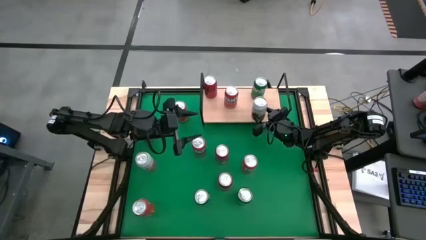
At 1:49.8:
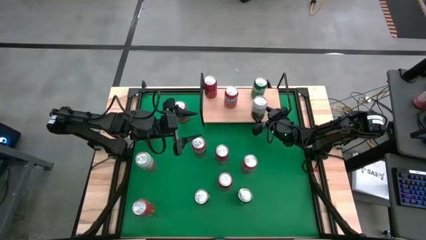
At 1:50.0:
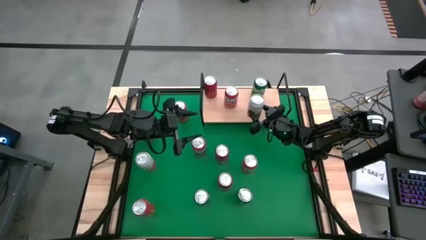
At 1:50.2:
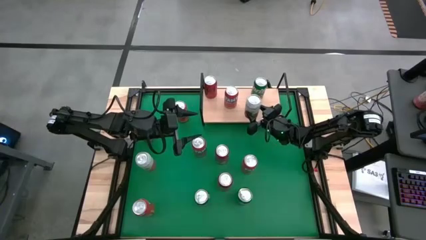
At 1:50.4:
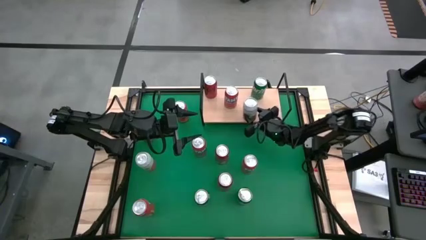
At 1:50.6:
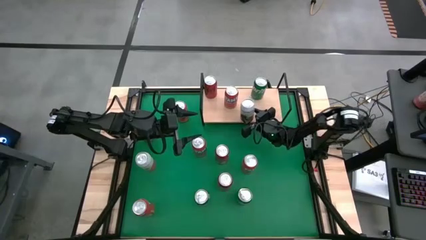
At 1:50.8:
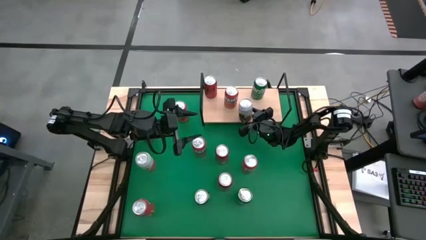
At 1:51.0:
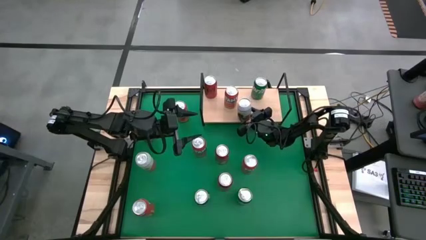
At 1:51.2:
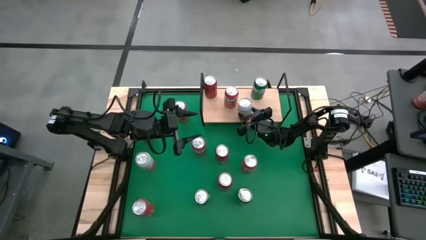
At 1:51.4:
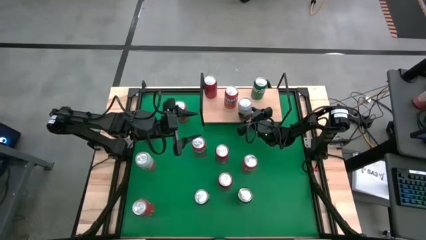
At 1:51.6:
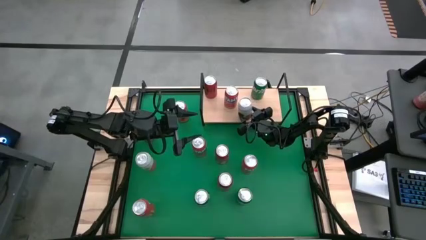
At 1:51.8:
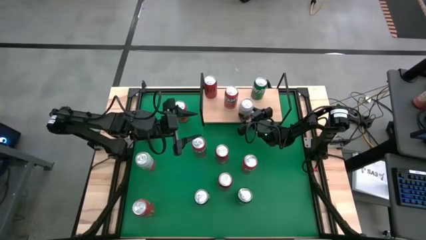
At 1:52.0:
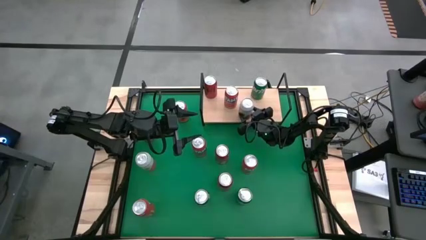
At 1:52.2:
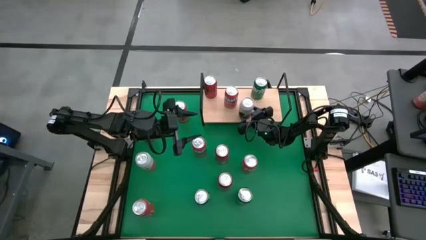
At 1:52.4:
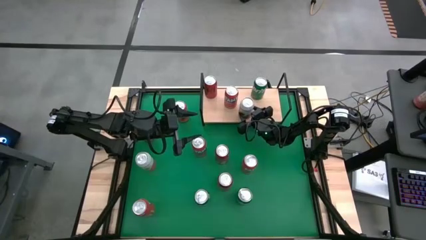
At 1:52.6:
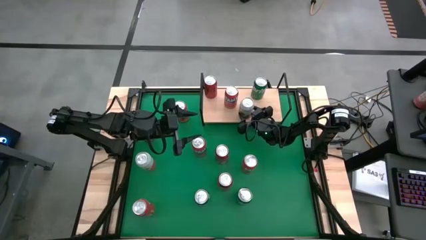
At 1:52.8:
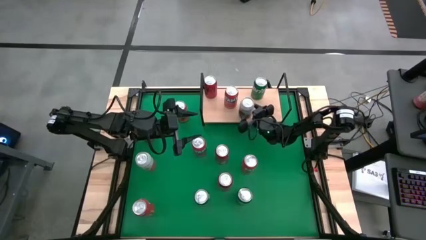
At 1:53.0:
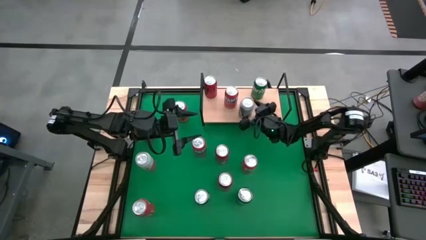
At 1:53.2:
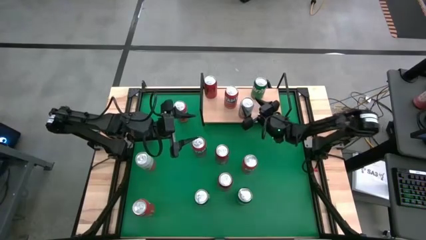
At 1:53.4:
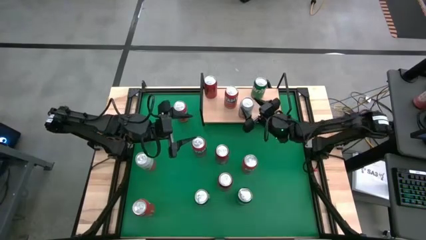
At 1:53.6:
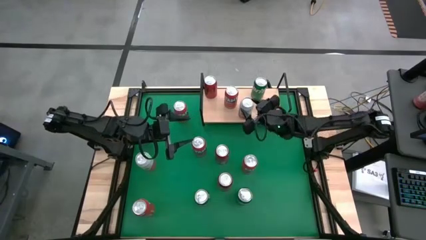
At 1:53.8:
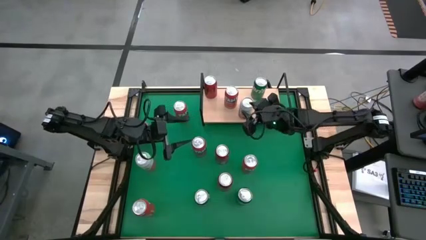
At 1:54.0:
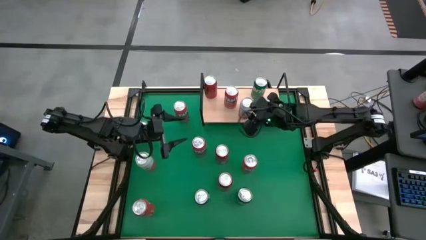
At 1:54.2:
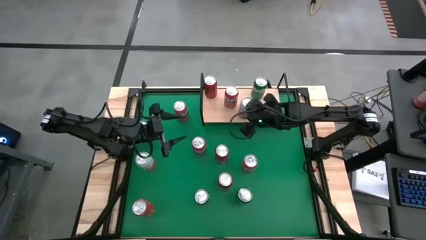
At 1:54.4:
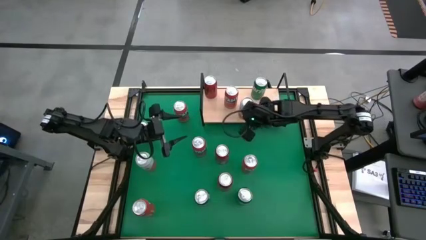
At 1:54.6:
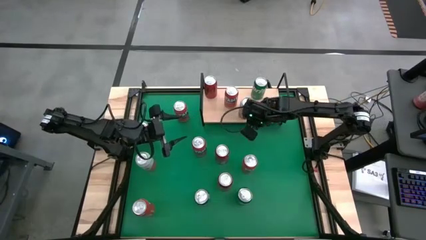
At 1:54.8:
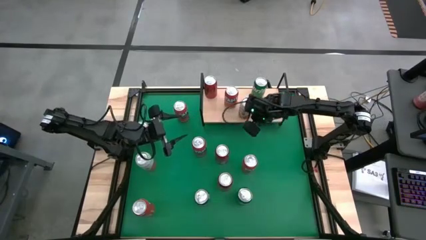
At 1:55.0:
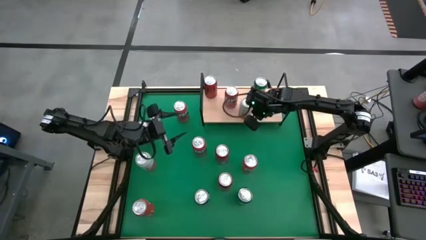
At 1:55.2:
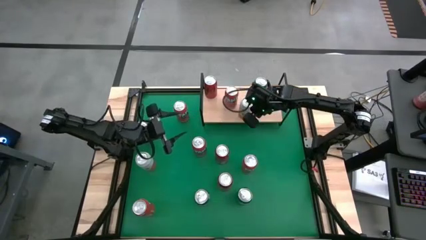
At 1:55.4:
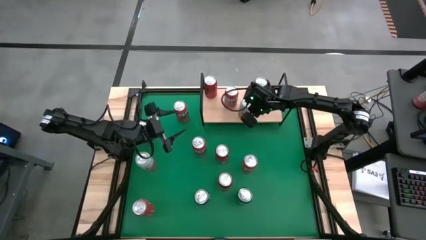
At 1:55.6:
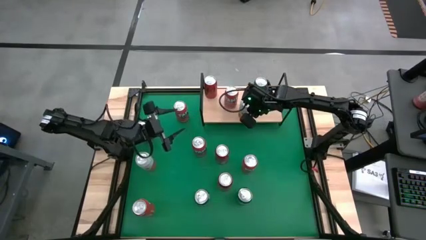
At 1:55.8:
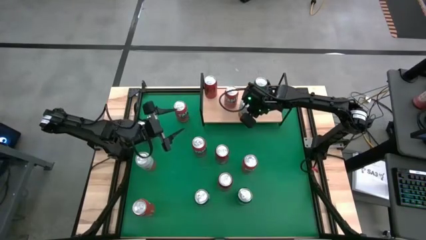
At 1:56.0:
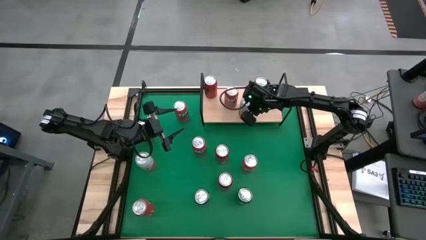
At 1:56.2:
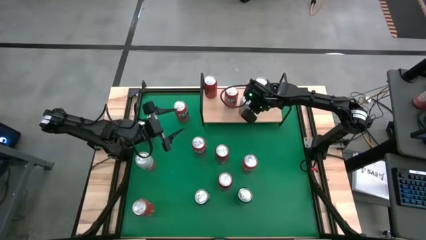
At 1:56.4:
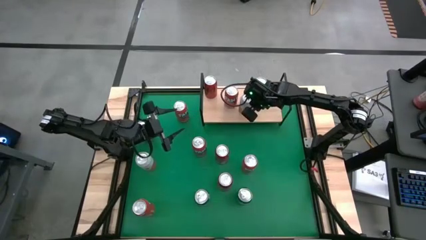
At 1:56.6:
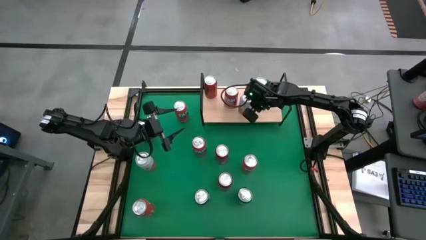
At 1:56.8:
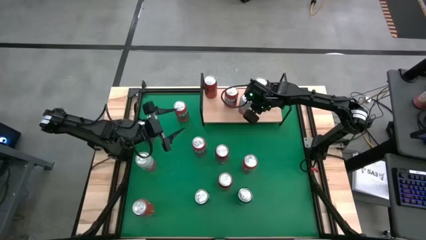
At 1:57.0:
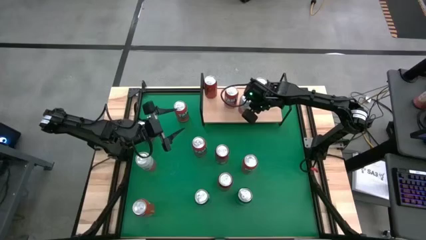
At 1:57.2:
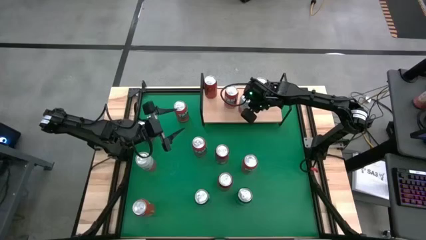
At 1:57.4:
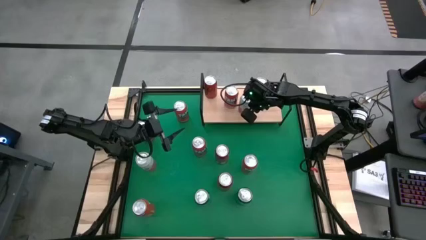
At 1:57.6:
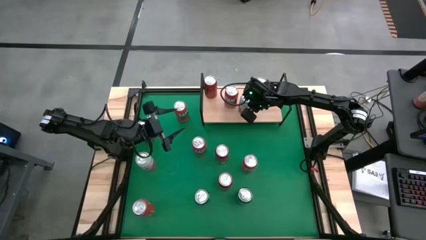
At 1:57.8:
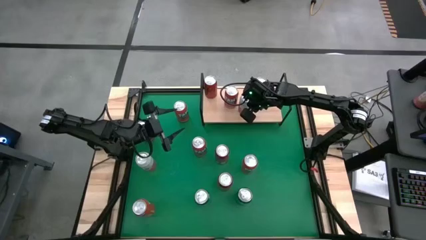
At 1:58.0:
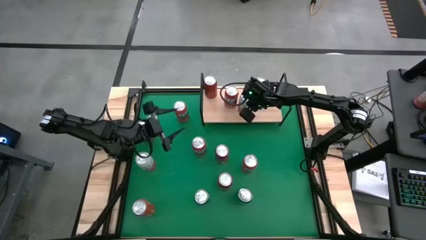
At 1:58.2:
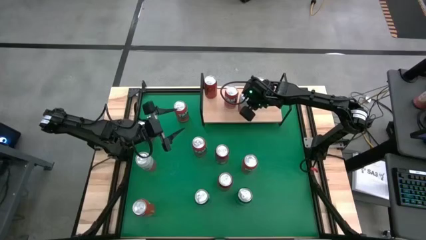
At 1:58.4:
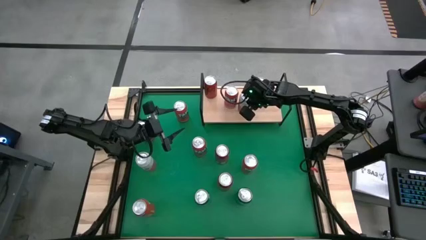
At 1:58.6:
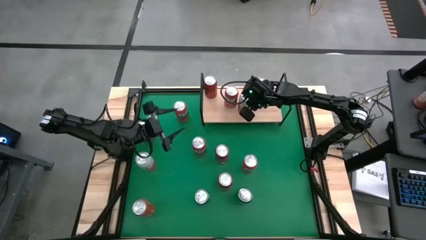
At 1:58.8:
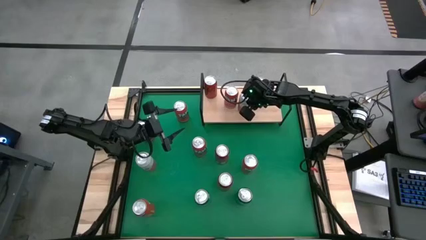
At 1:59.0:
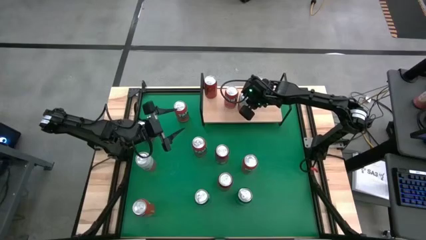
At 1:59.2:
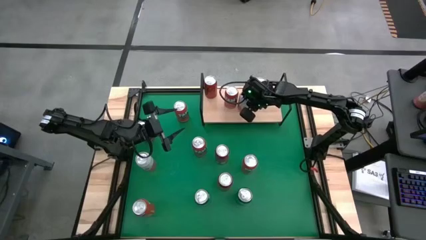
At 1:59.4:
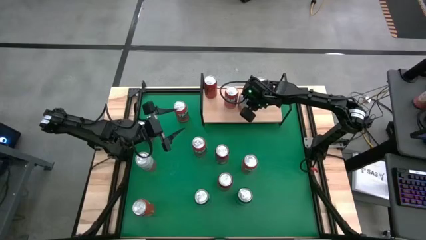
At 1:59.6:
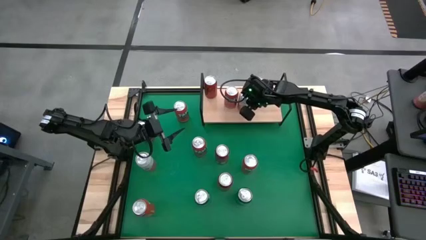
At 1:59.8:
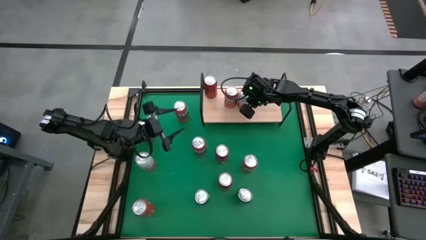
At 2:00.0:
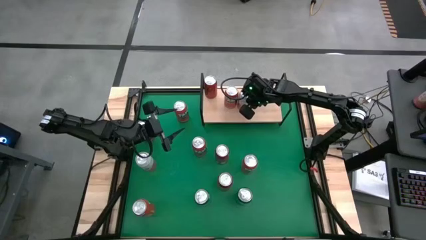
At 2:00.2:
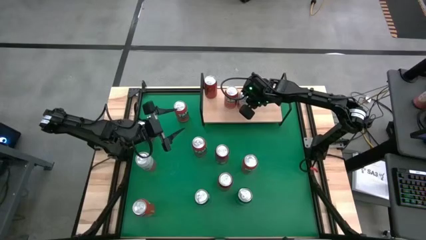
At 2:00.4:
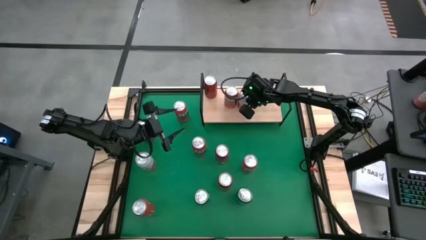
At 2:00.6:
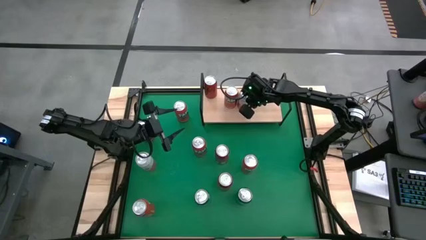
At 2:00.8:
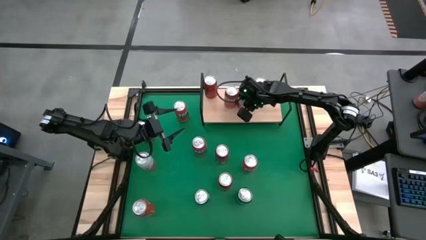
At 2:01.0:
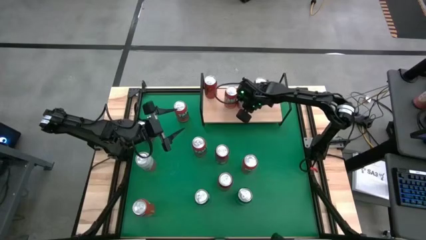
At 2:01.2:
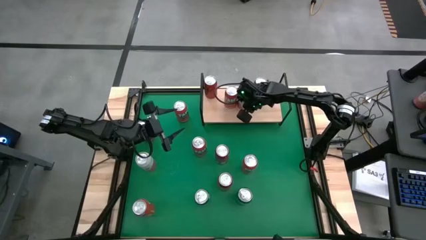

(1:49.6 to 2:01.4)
Task: Place canned beverage on shelf
Put the pink-white soda can on the shelf

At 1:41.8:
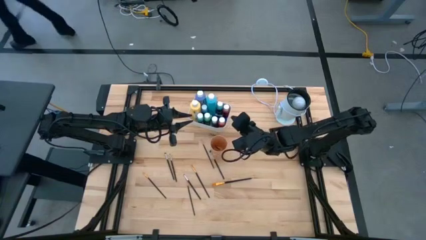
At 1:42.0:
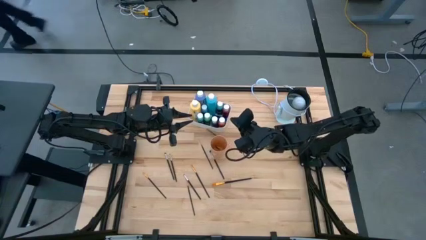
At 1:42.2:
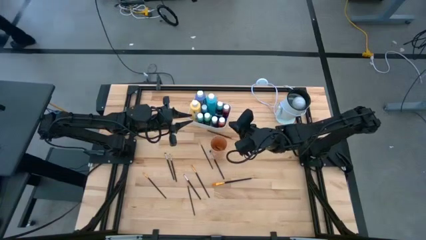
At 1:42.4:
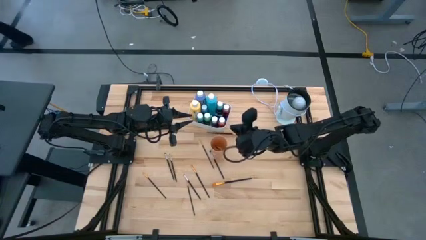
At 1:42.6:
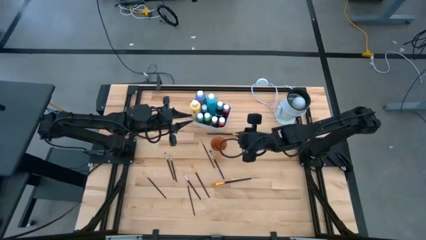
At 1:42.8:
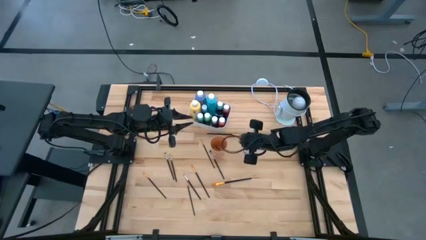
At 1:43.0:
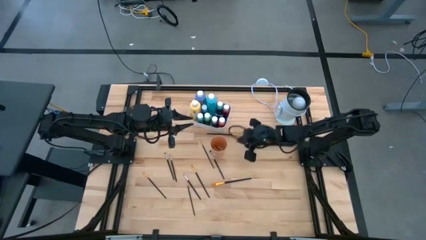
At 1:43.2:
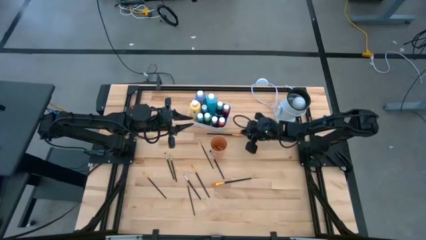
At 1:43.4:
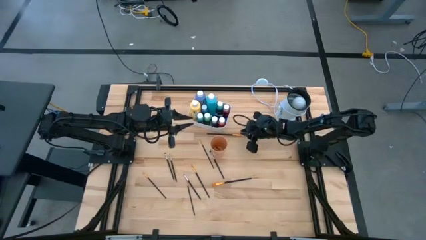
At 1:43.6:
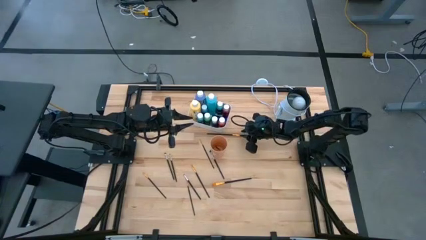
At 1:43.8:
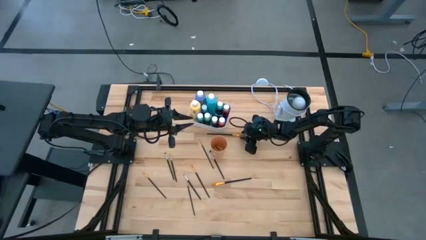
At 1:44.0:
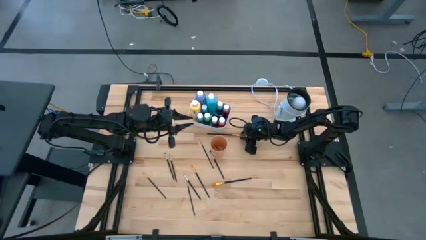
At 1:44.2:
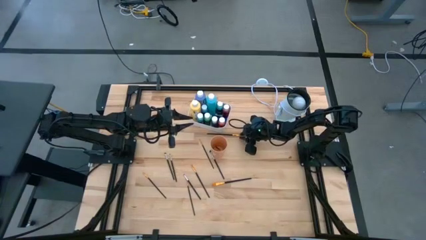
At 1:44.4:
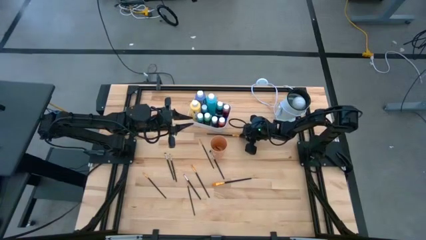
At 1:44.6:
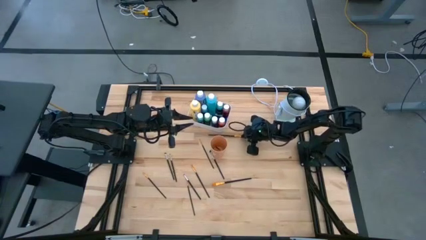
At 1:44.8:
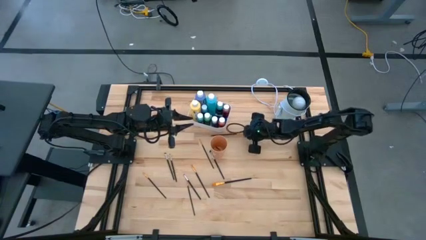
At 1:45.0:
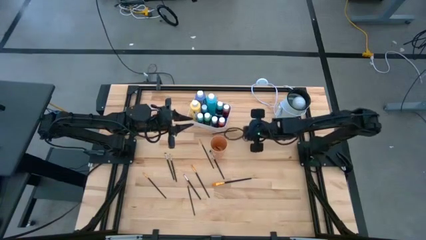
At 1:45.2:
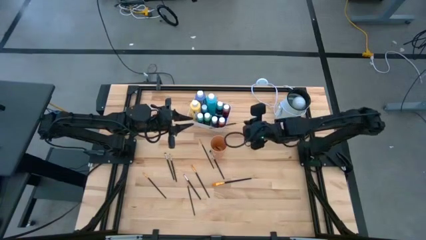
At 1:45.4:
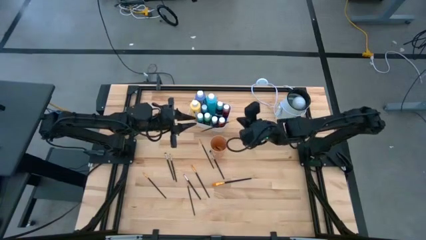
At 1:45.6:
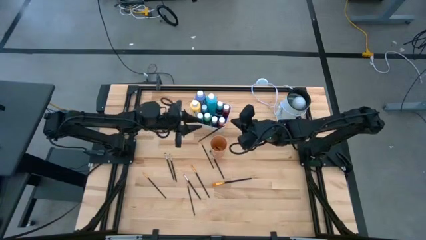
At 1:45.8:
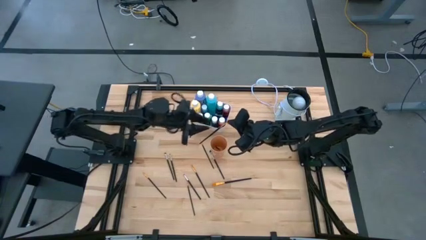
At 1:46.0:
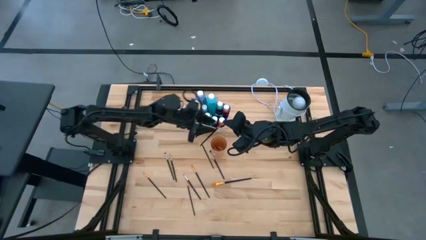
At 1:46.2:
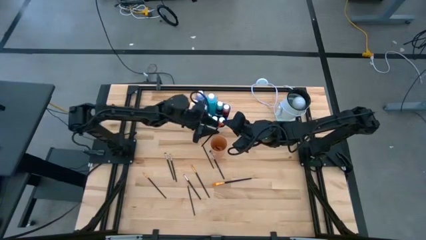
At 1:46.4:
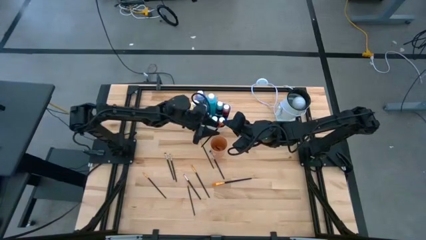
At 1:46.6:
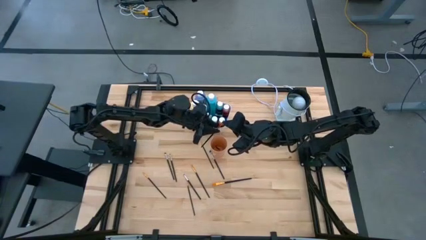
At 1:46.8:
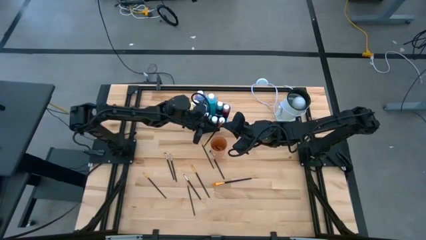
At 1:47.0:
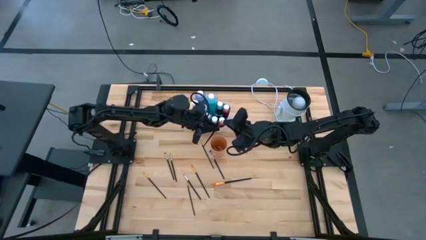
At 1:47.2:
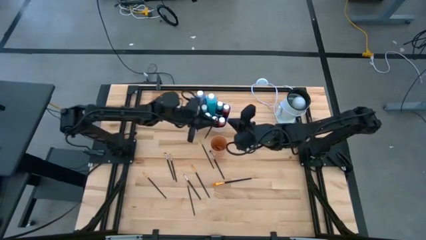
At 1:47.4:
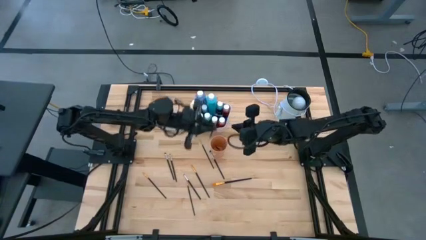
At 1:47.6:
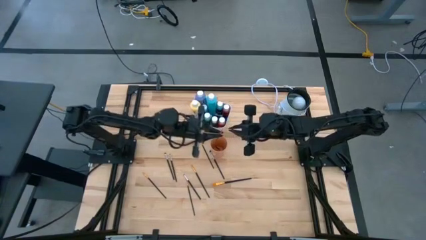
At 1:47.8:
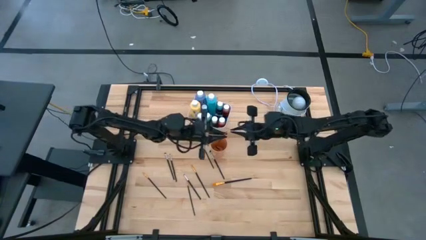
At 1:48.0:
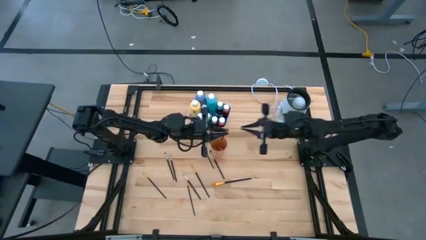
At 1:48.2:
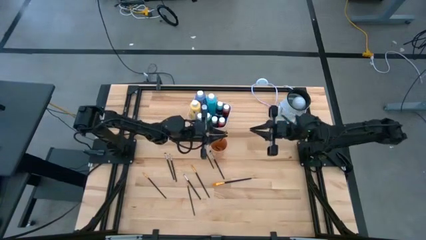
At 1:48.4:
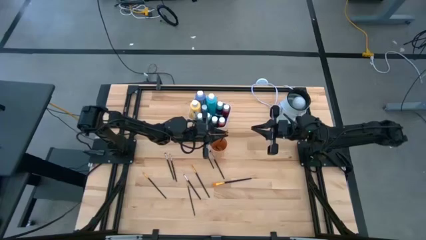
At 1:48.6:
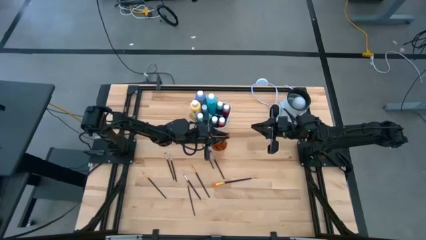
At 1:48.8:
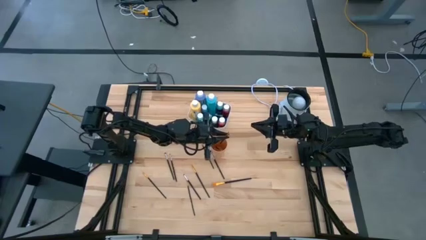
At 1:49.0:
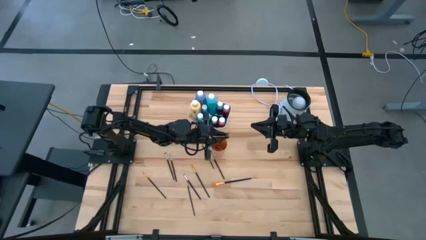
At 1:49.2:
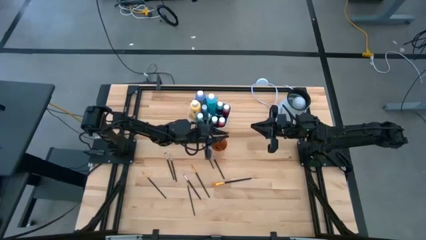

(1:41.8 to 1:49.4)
Task: Pick & Place Paint Supplies
Put the black paint brush into the orange cup
